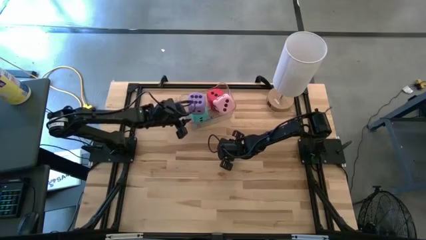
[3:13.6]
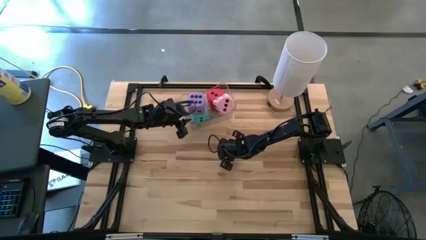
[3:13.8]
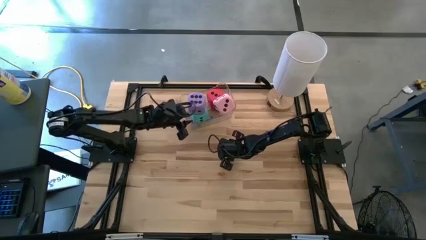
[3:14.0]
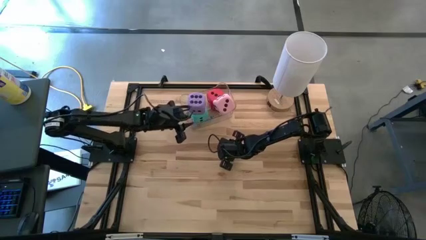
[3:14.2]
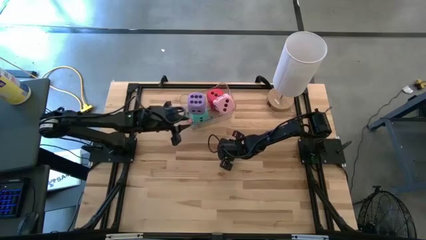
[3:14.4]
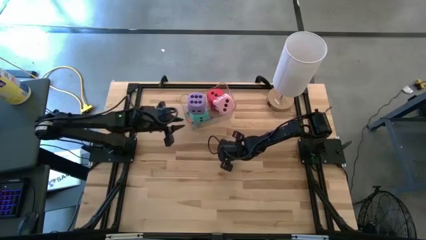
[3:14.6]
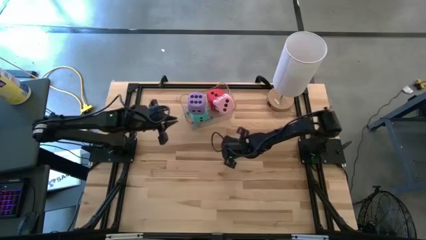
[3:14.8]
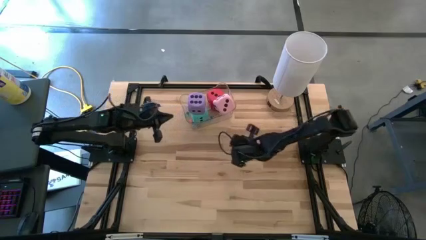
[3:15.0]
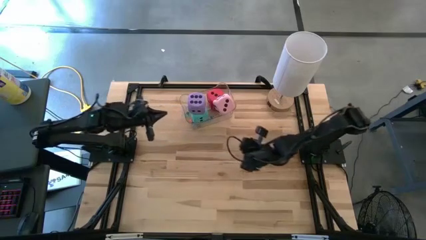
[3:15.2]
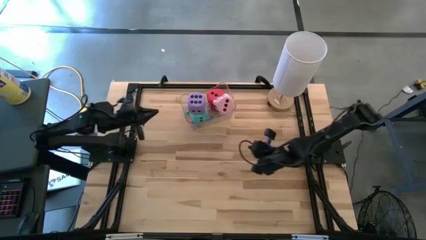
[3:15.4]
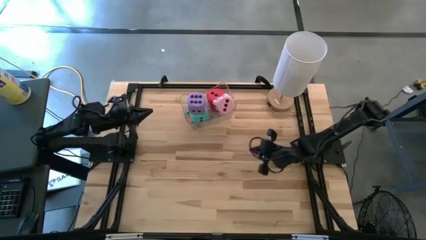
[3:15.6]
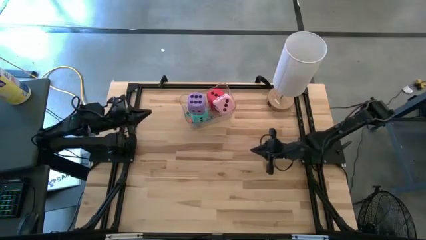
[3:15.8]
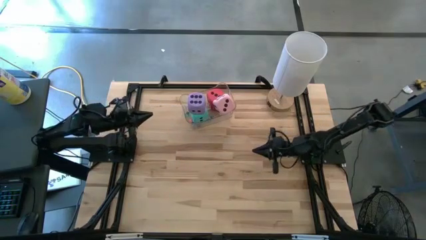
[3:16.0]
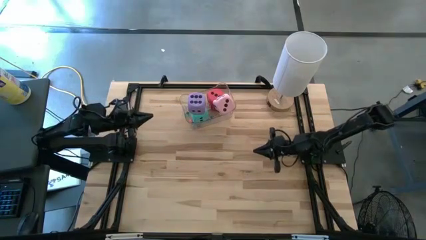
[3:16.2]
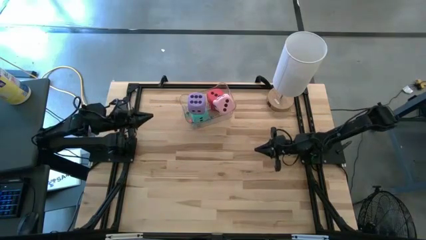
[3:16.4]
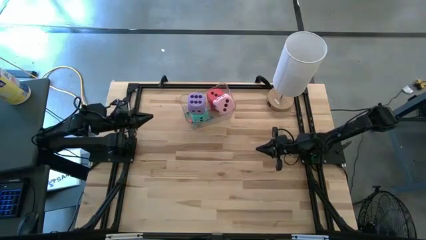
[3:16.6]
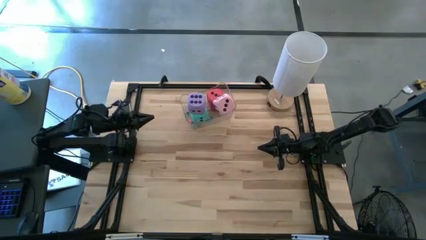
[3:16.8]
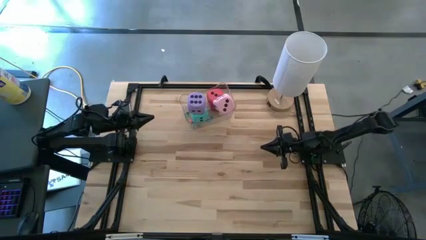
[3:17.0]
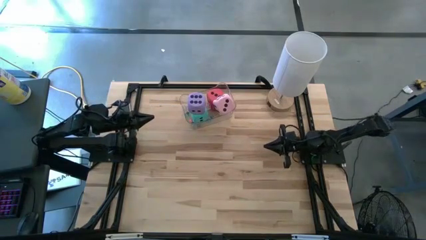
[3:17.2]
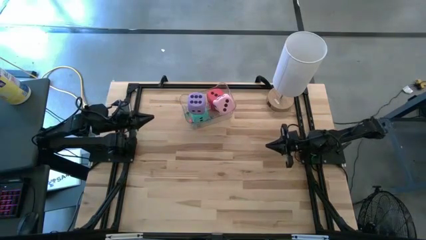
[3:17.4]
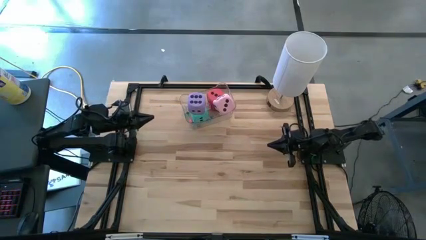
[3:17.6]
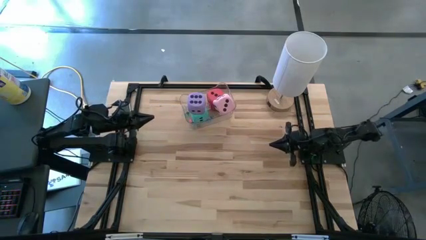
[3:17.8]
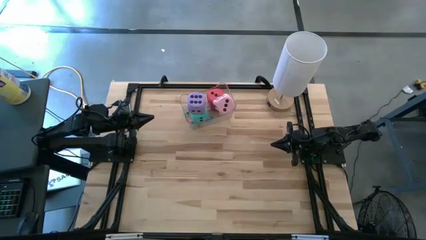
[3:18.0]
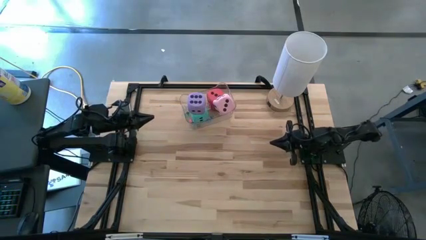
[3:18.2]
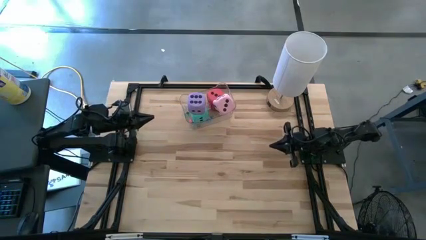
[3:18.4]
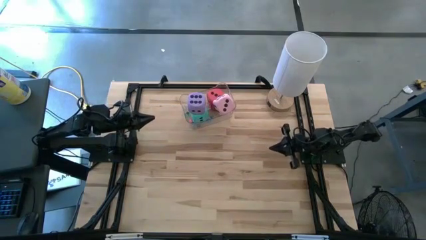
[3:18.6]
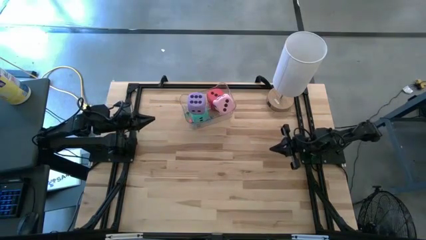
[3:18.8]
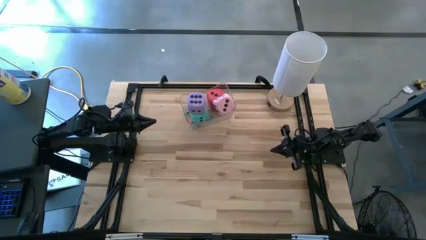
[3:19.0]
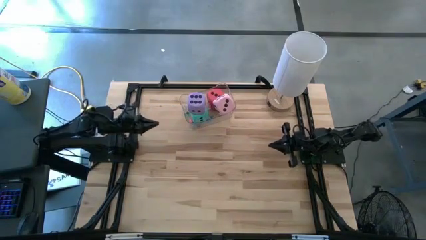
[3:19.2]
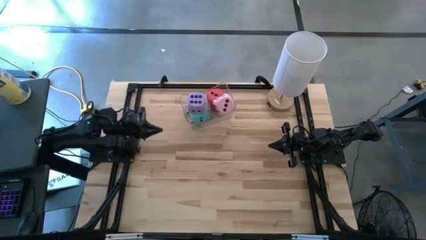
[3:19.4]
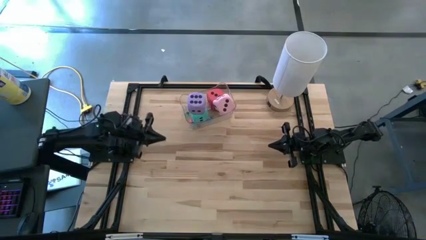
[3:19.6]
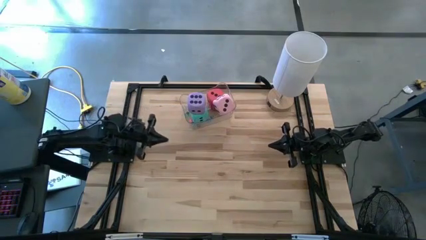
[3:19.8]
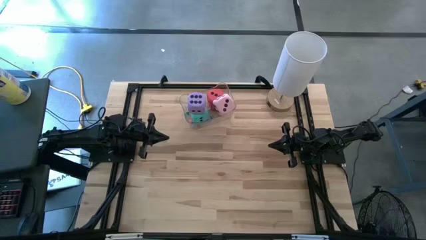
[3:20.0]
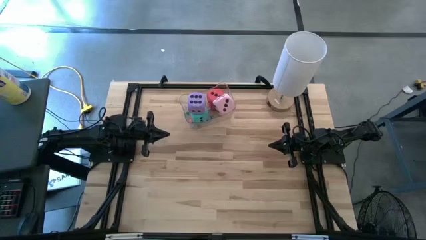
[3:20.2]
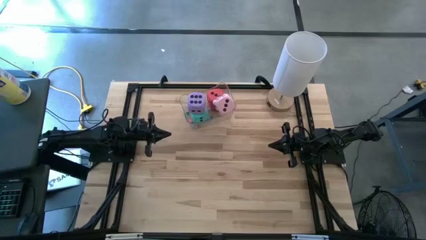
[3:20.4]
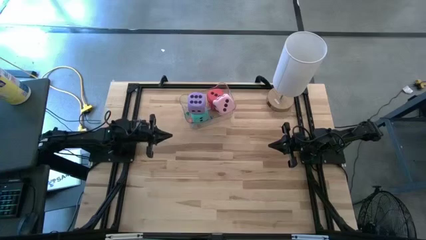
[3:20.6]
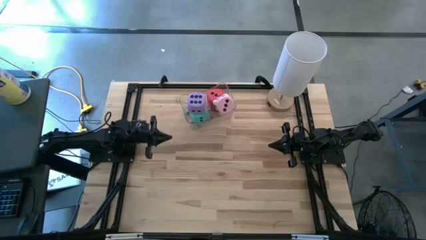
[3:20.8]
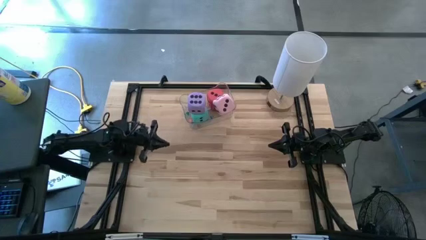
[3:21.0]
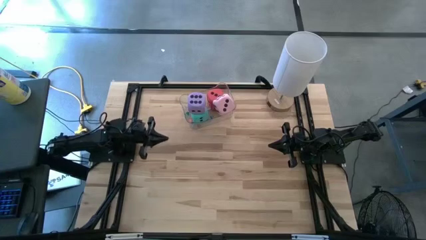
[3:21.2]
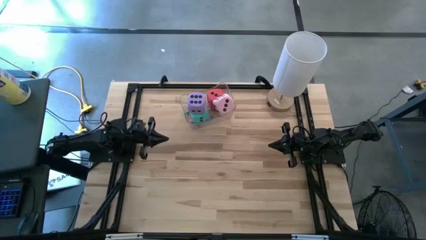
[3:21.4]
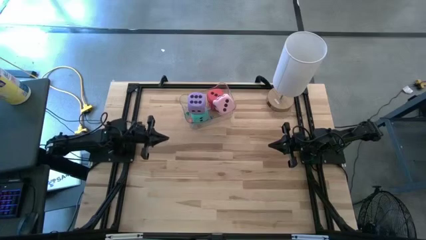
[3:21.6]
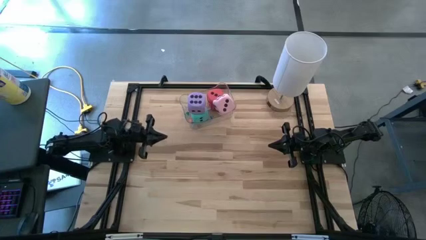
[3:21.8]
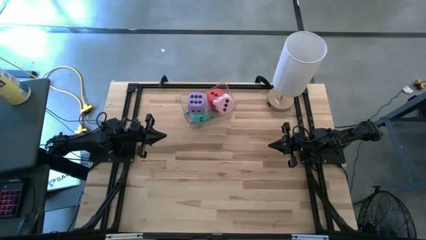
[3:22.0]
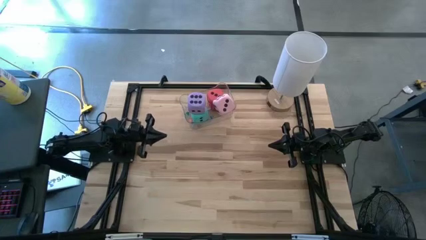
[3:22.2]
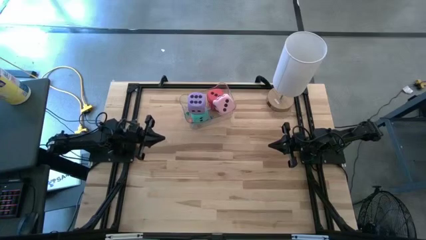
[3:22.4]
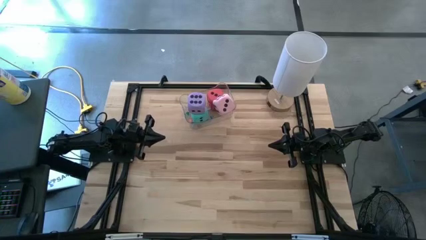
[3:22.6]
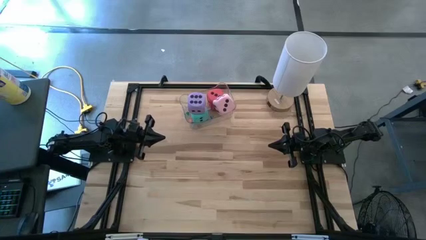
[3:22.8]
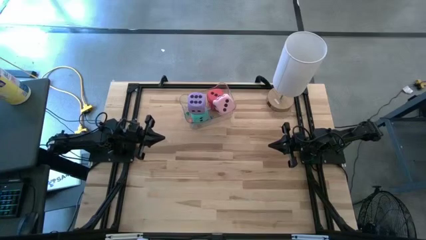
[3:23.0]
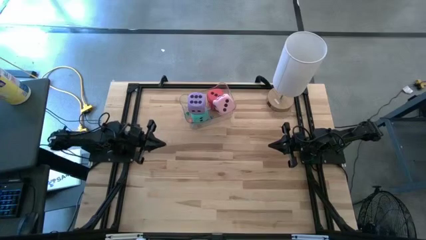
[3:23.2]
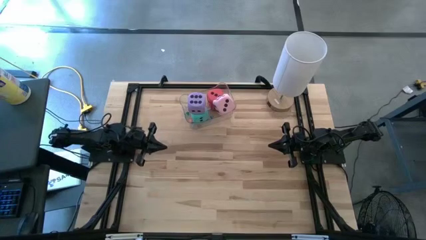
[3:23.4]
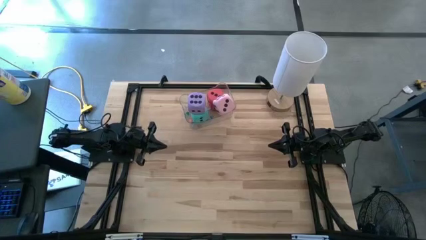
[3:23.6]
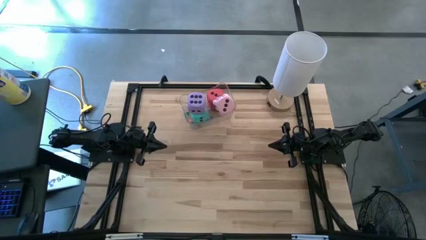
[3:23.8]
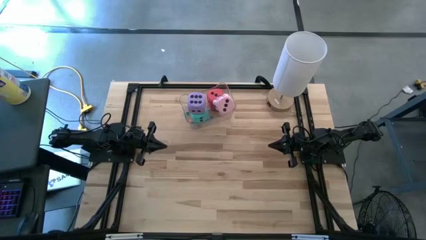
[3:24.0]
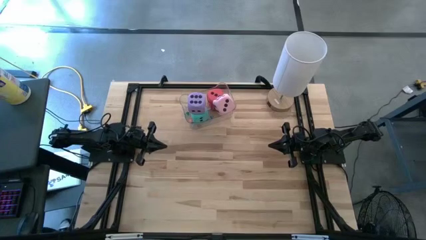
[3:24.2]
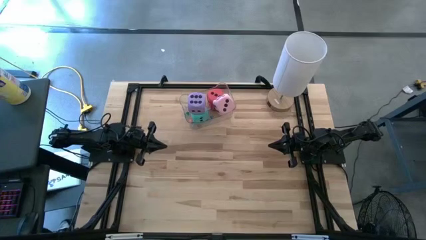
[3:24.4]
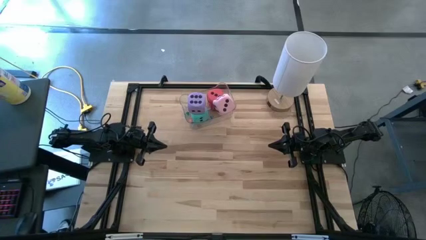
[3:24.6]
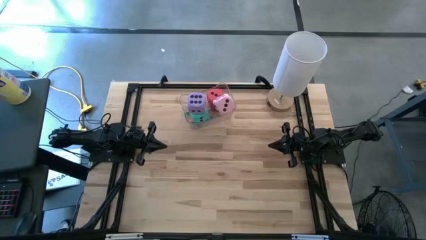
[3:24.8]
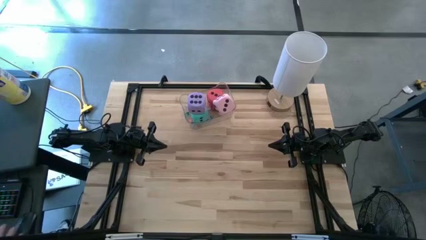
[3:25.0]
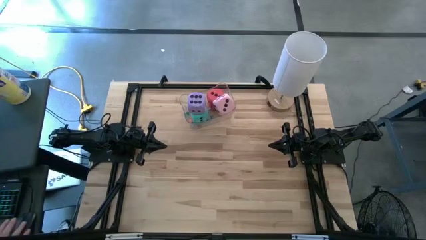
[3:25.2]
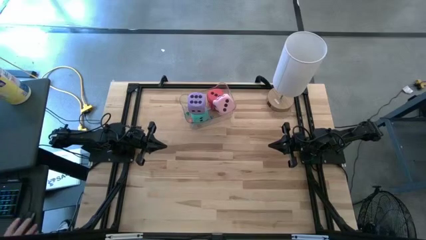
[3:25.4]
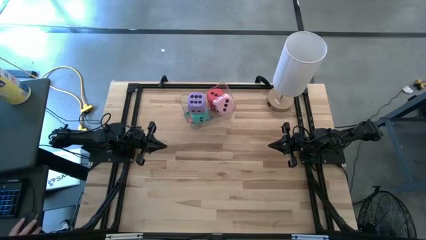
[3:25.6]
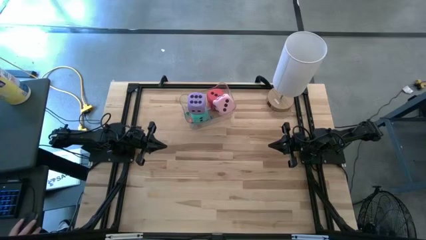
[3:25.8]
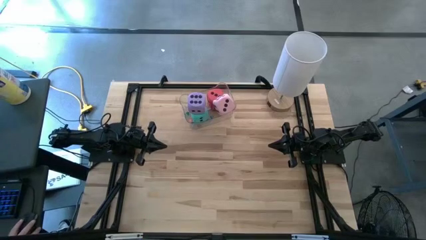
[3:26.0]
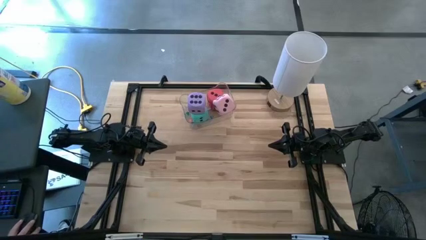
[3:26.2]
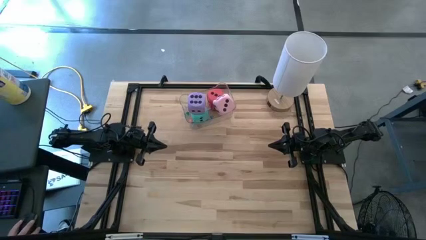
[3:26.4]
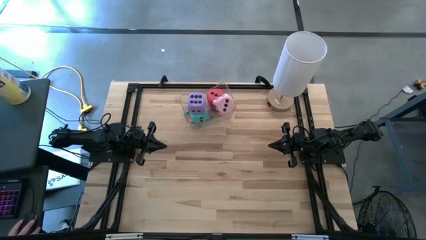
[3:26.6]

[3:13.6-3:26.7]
Task: Pick & Place Dice
Return to Home Position

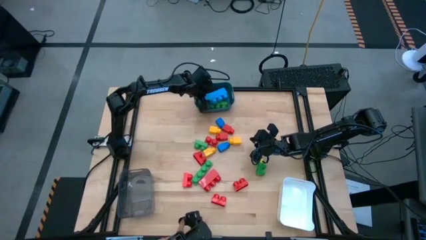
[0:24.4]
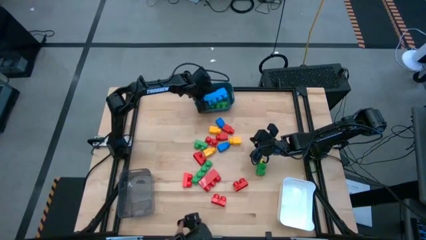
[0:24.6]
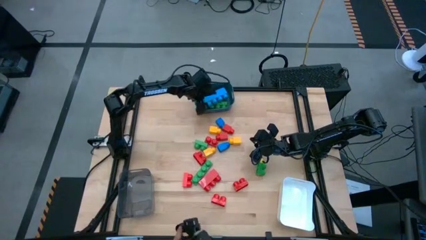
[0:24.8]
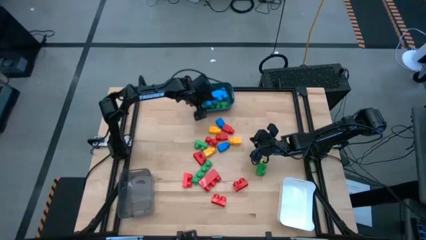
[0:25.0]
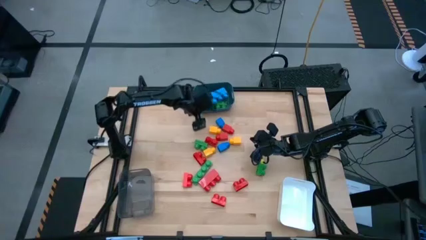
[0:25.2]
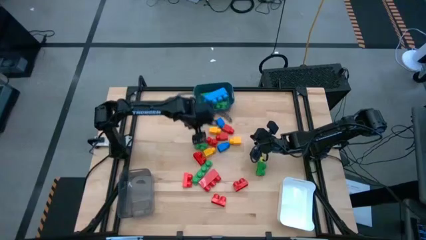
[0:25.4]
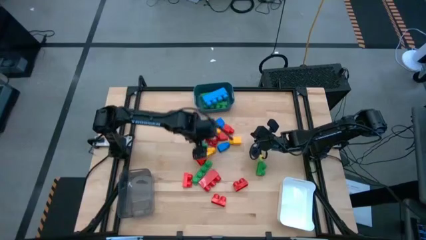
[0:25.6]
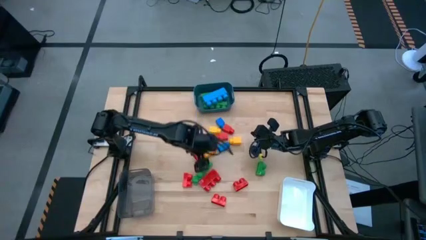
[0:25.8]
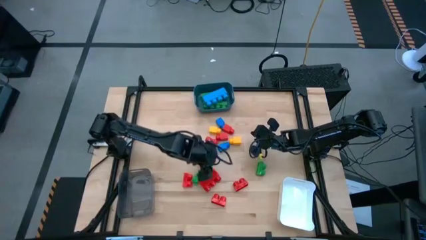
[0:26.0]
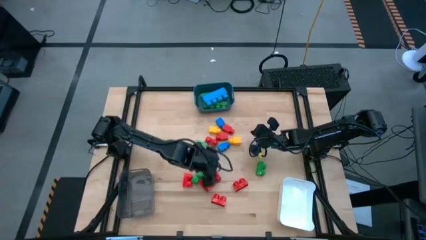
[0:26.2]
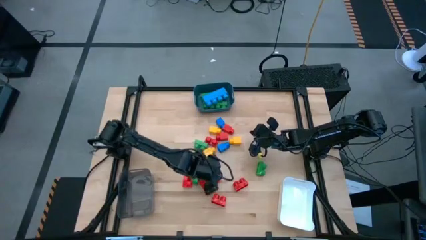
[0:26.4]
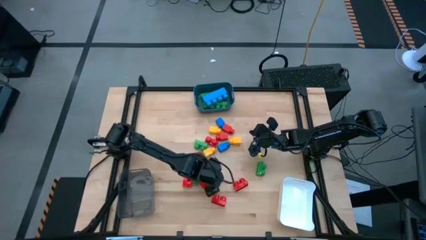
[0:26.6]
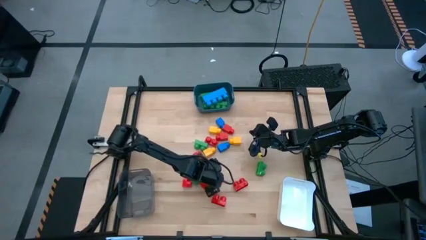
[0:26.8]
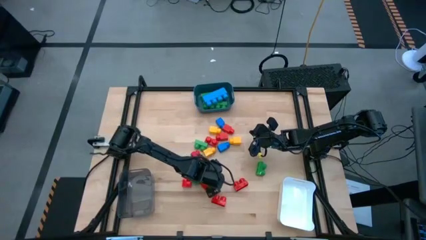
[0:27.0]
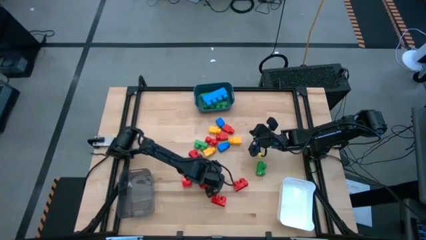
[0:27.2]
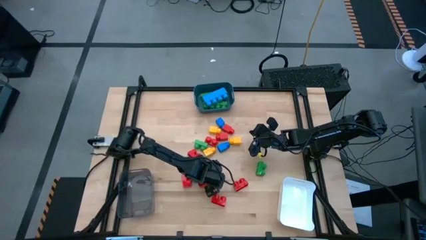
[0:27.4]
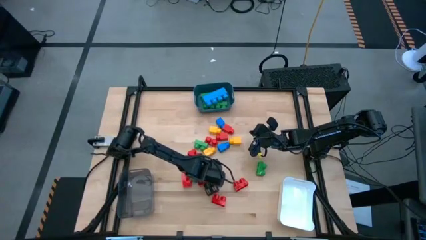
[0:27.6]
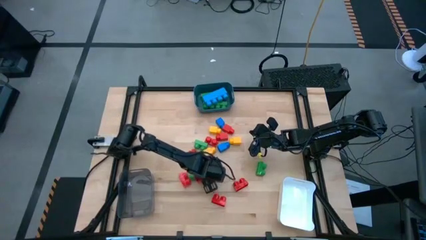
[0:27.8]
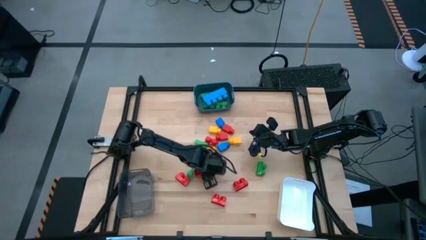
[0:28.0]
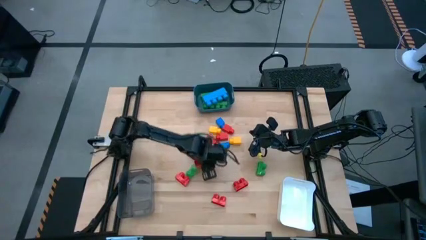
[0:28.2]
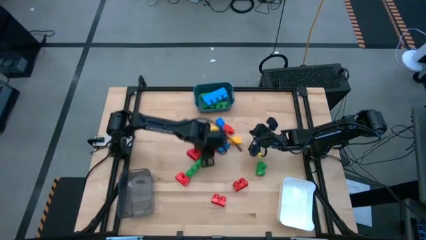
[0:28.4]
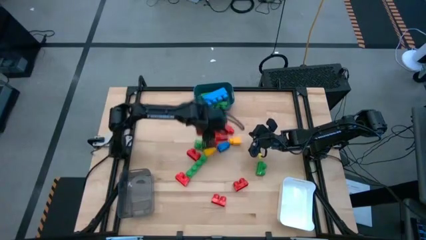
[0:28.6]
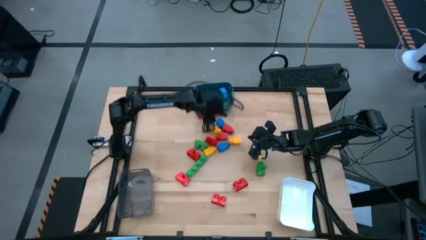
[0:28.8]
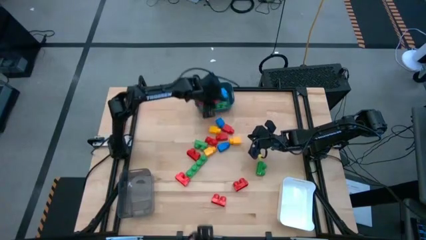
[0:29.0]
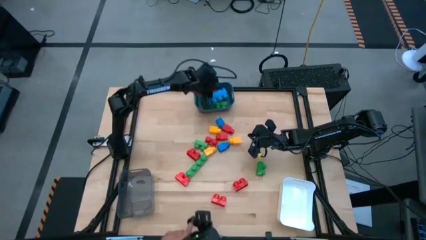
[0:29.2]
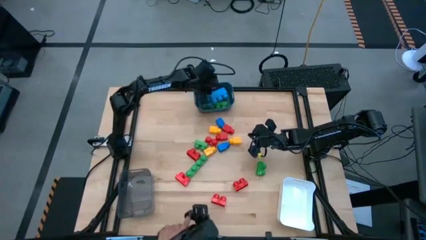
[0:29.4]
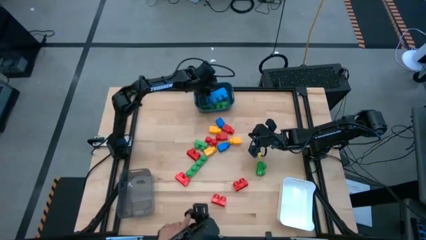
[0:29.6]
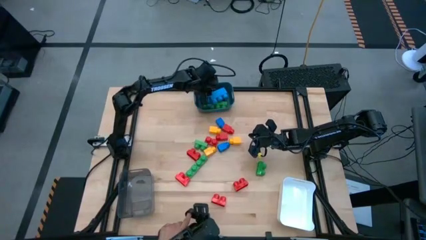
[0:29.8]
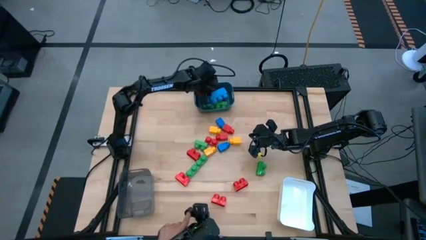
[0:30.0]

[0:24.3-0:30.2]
Task: Sort blocks by size
Put the red game piece into the blue container
